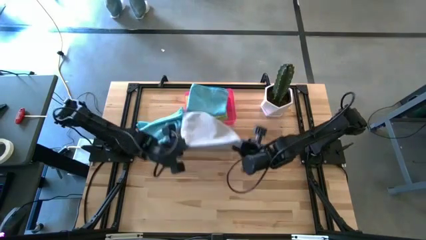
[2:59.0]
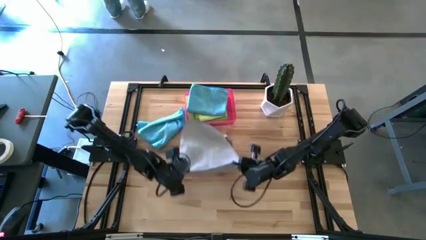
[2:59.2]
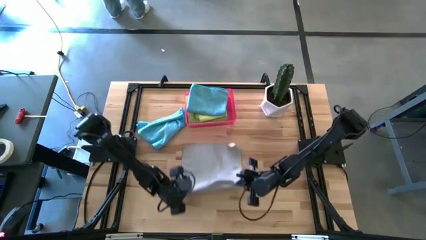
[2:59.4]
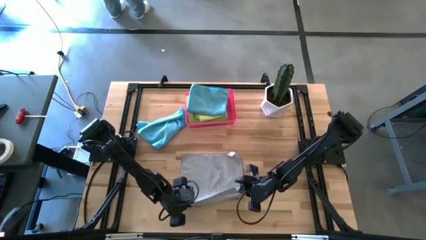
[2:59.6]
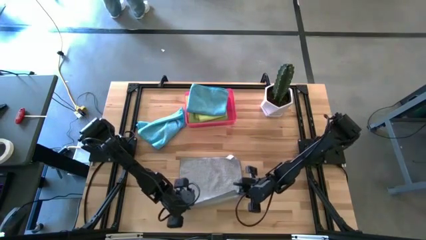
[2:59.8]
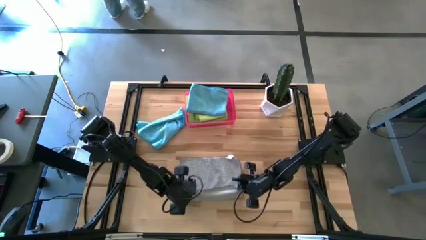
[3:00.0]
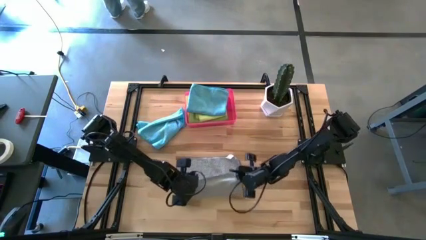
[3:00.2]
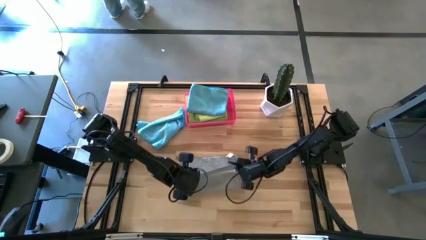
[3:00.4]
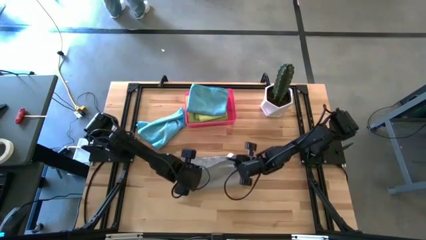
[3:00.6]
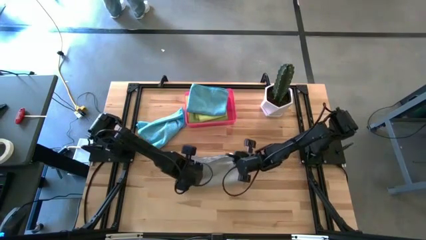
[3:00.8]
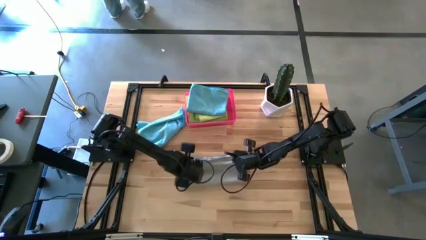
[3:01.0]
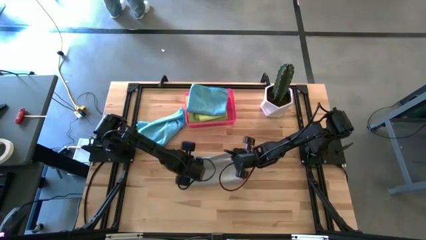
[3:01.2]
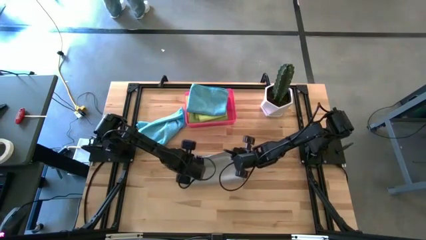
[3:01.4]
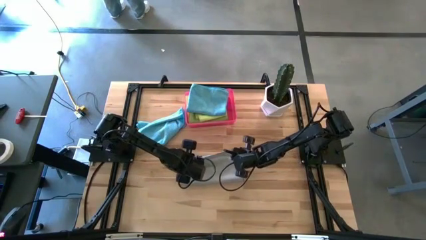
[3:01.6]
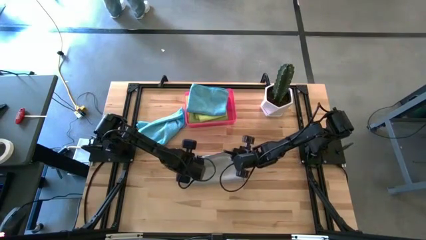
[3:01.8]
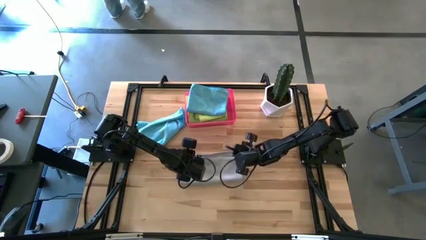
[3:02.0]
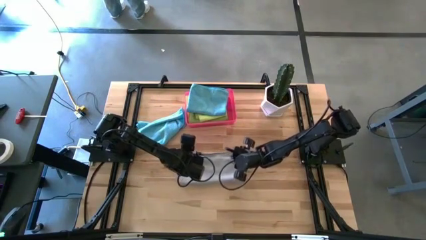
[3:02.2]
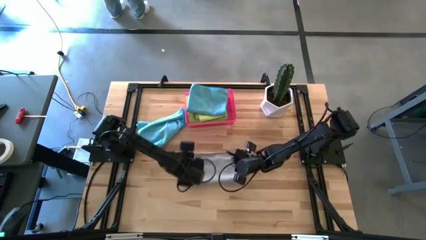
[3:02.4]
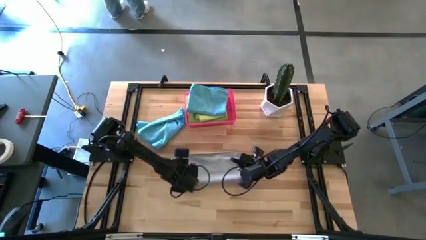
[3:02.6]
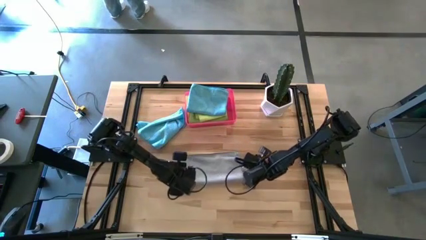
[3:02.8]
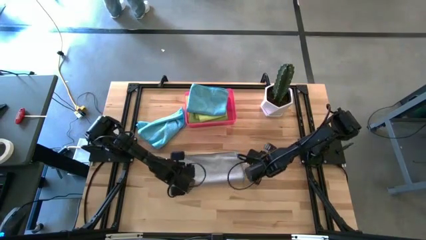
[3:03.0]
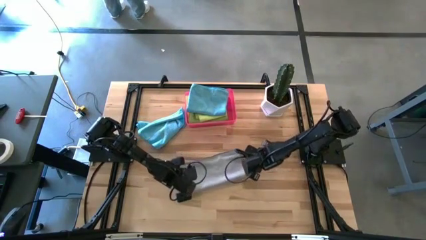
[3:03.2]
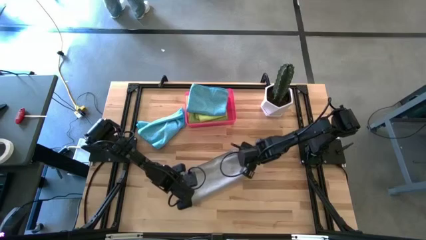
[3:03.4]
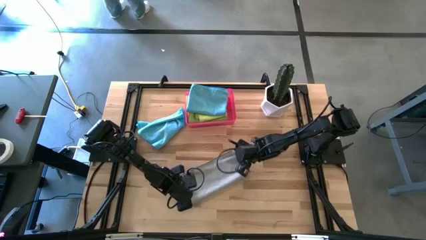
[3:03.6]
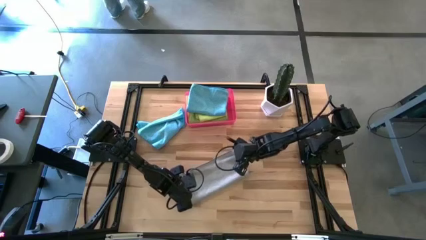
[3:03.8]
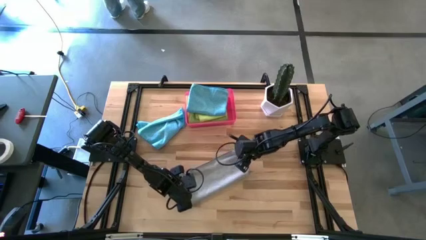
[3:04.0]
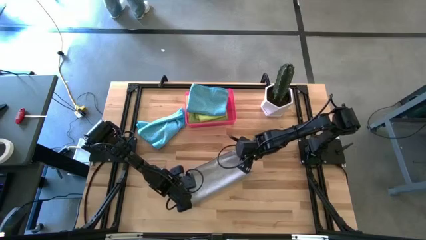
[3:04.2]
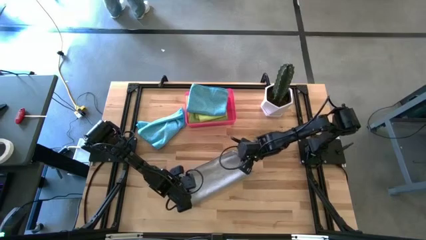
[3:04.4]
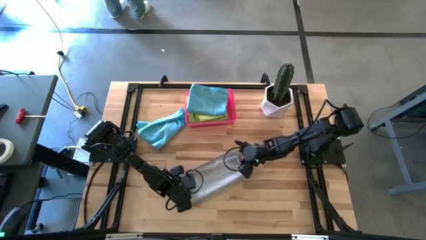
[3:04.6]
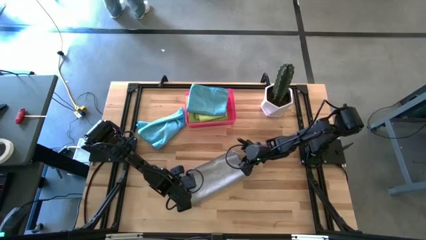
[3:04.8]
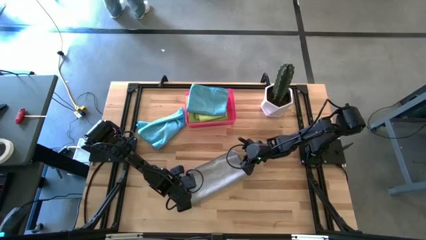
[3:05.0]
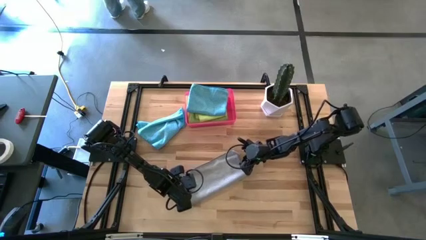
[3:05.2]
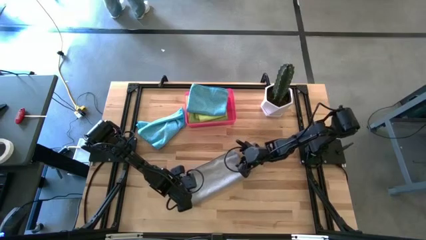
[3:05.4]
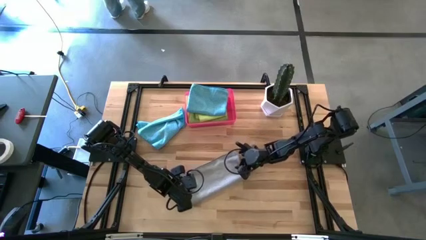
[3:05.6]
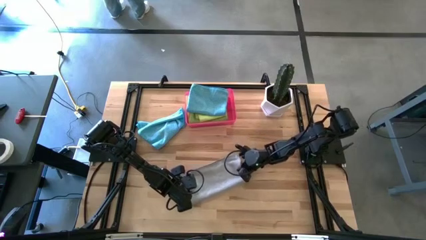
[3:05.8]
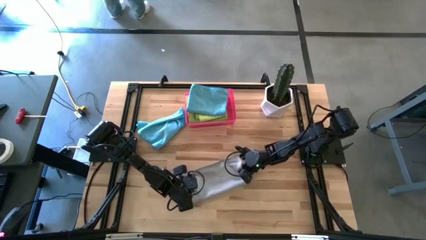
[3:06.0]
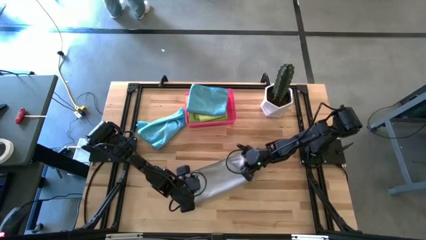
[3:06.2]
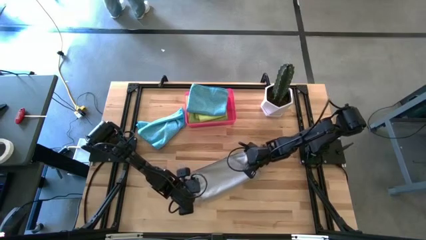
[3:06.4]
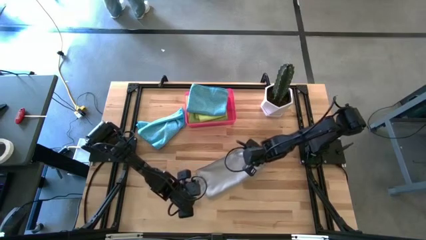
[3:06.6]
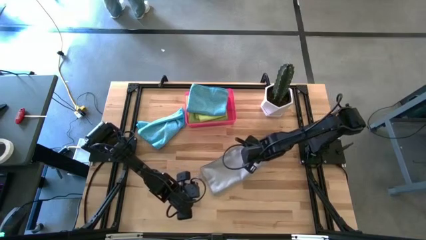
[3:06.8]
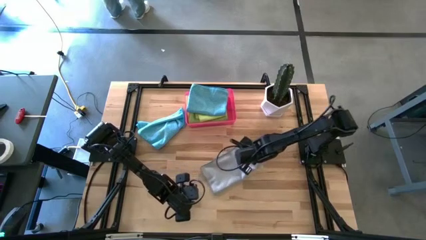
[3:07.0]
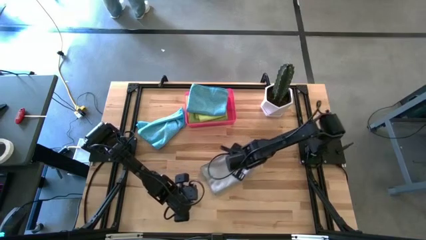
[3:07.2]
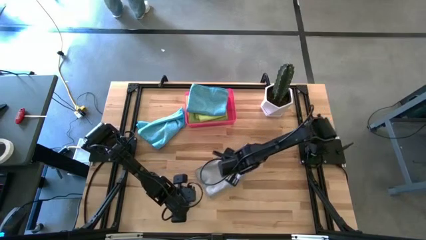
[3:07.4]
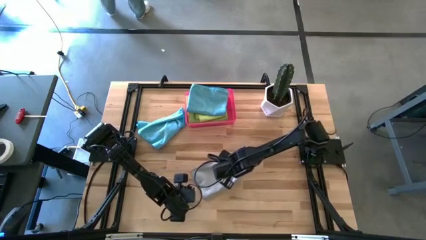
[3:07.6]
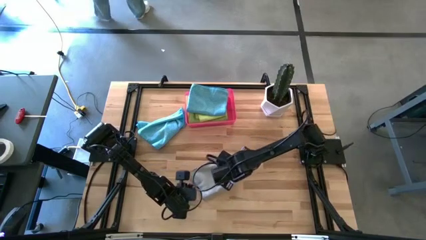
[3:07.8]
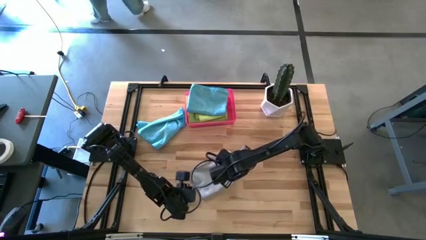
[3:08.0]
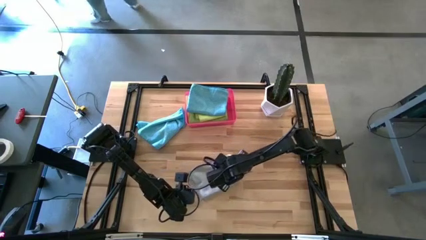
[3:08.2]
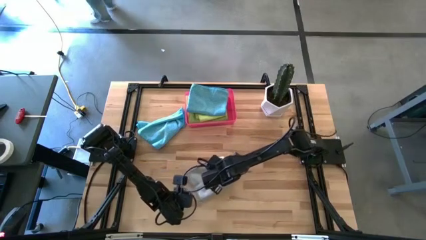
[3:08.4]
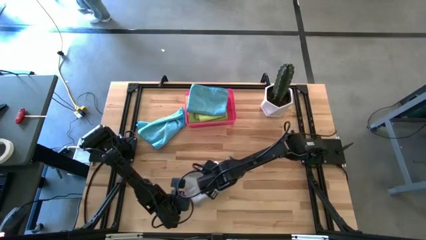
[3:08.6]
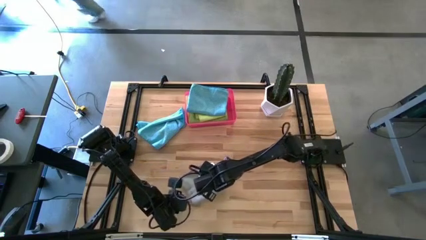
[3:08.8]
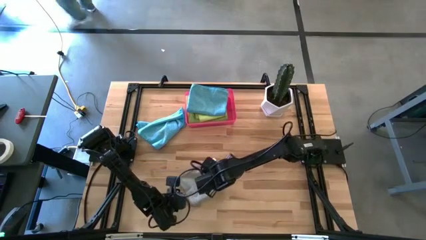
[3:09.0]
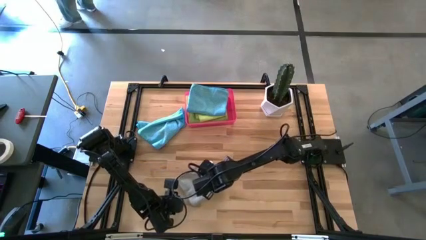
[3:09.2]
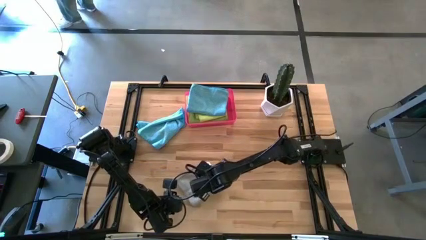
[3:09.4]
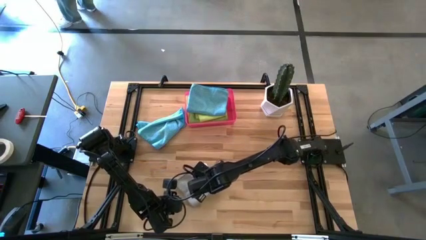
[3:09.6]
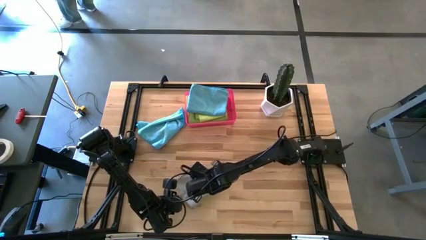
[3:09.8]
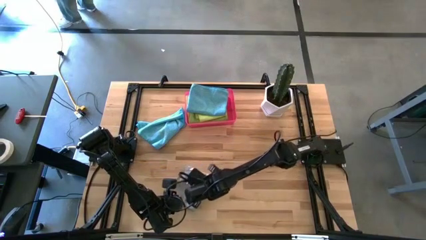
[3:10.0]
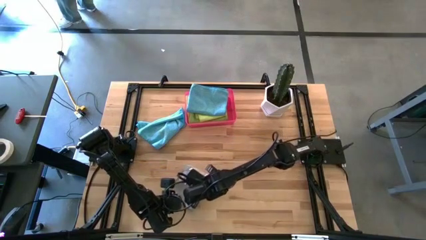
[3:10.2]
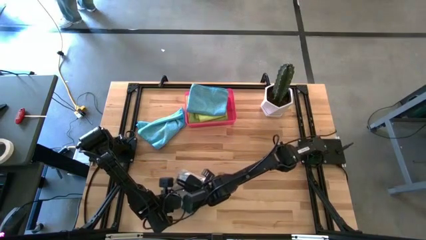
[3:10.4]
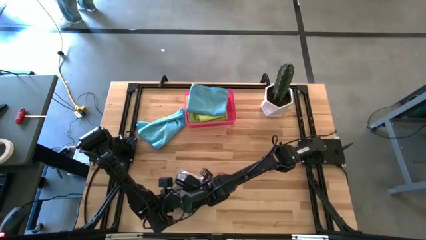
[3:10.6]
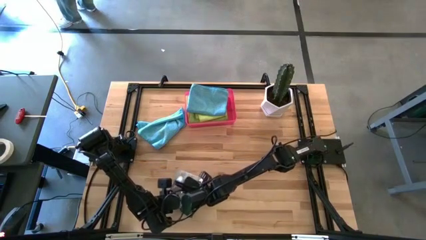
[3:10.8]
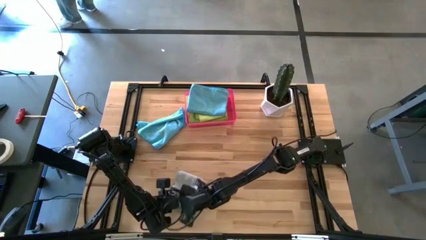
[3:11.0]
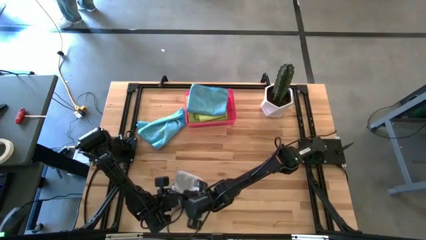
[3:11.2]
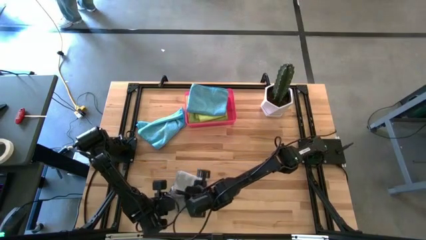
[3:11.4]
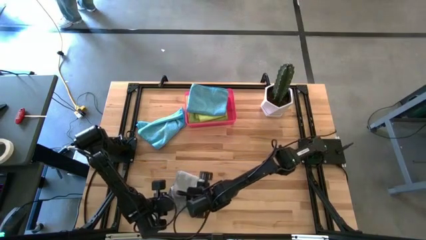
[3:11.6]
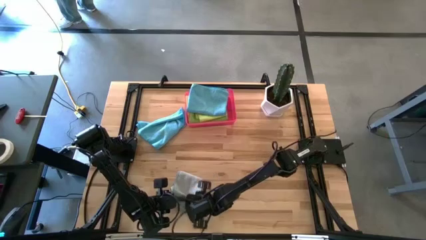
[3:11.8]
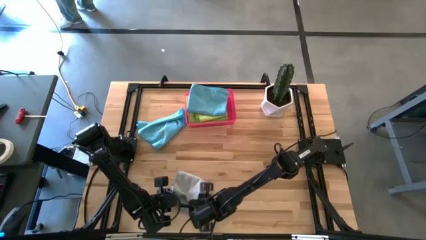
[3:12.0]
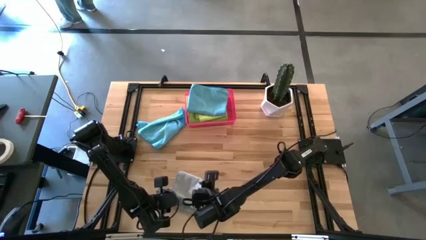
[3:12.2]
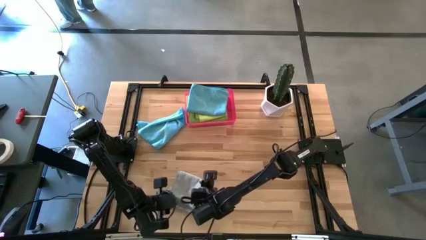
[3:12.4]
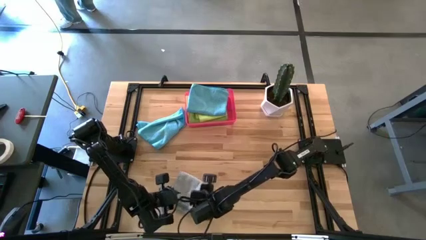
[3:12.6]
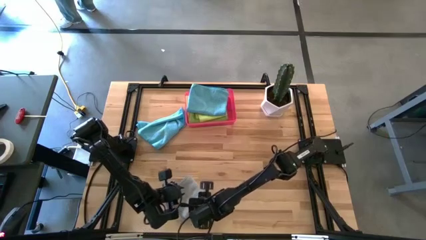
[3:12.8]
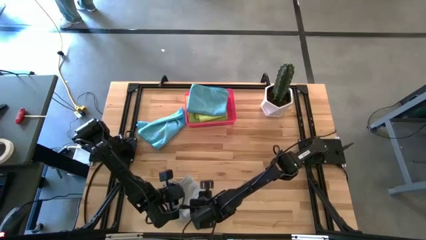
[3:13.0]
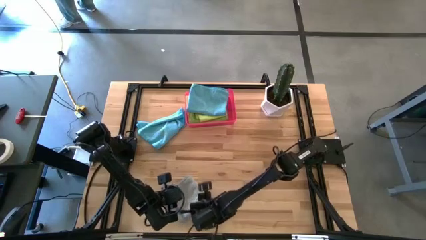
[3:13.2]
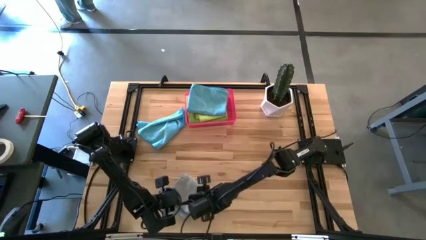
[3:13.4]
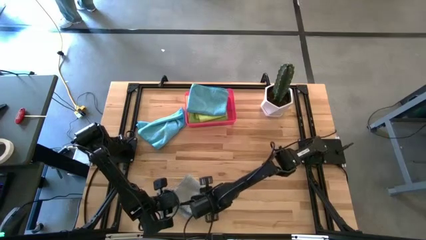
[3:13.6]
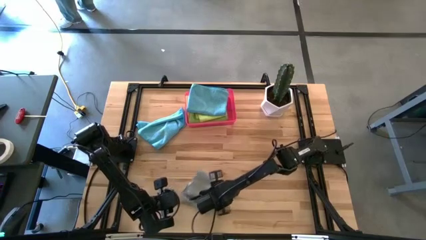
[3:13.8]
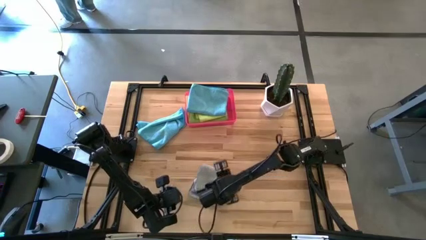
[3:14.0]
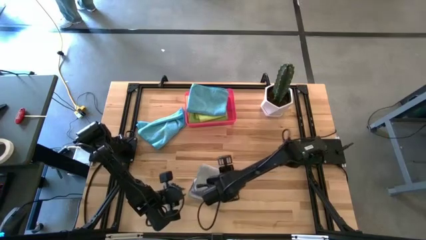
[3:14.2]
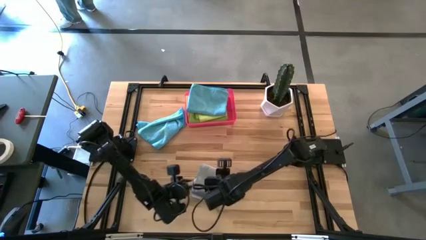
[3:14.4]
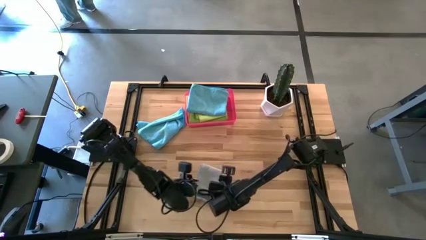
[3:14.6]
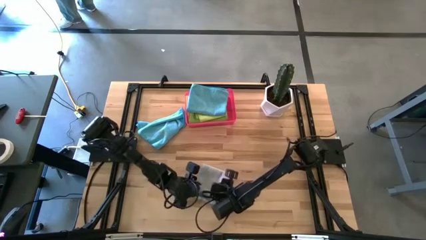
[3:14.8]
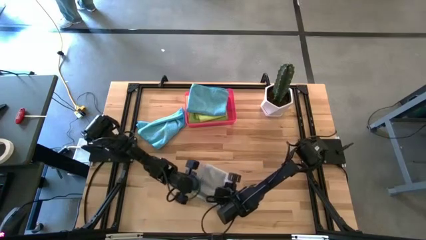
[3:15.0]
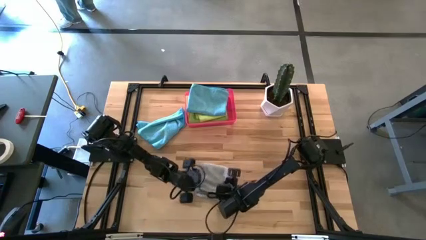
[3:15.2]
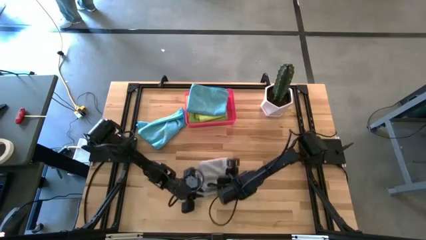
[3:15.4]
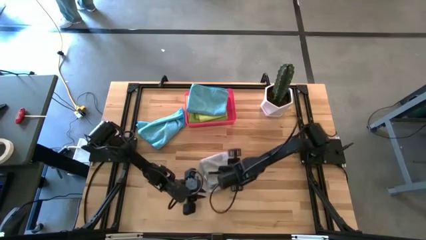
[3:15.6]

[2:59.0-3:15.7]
Task: Fold microfiber towels
Fold the gray microfiber cloth
